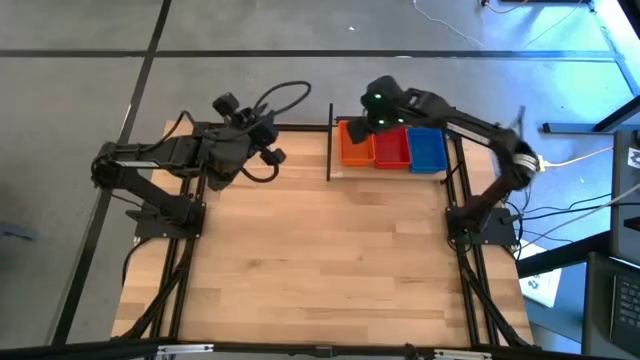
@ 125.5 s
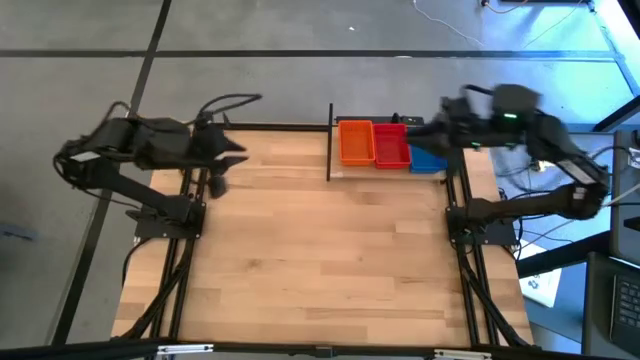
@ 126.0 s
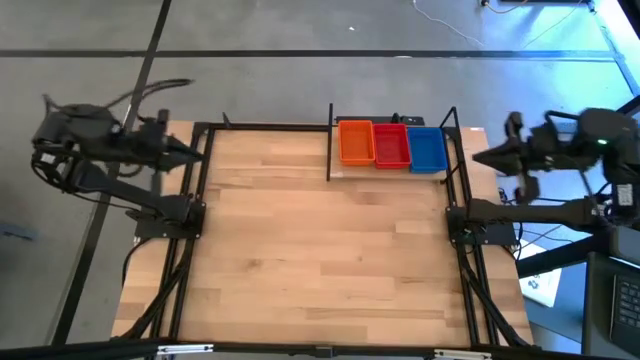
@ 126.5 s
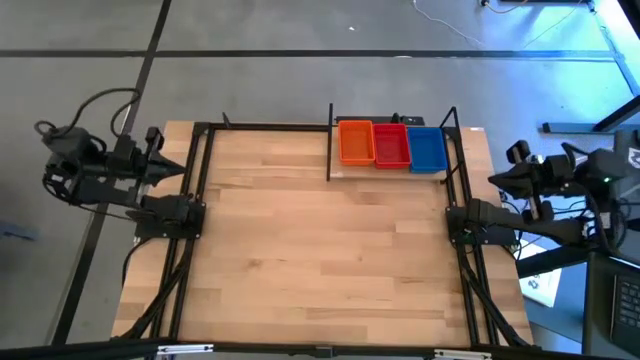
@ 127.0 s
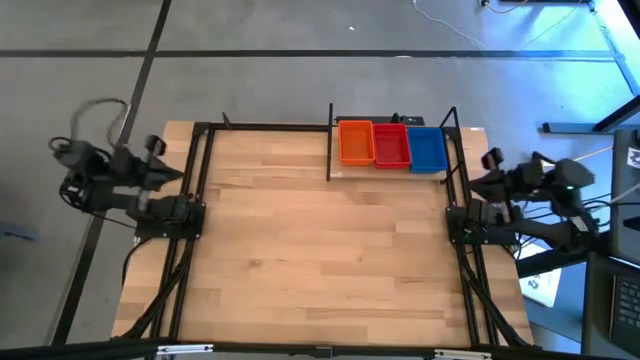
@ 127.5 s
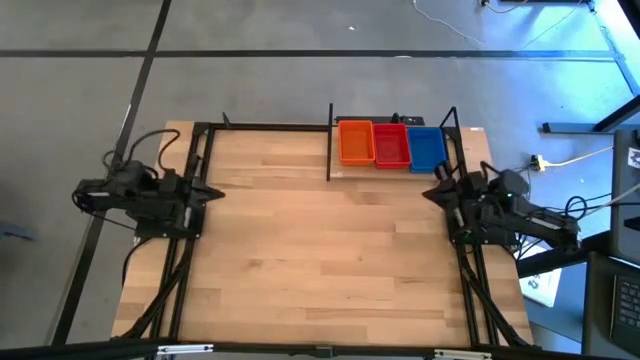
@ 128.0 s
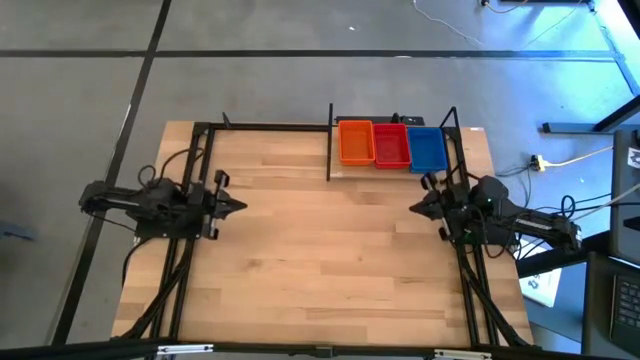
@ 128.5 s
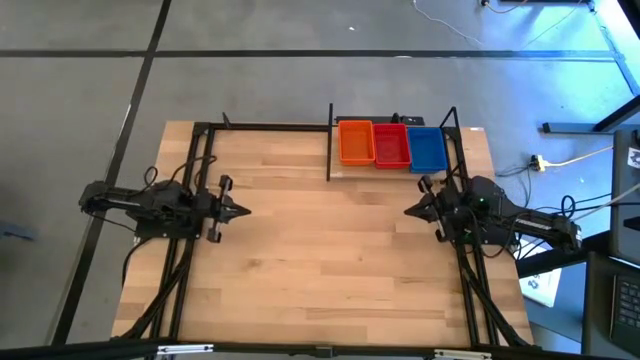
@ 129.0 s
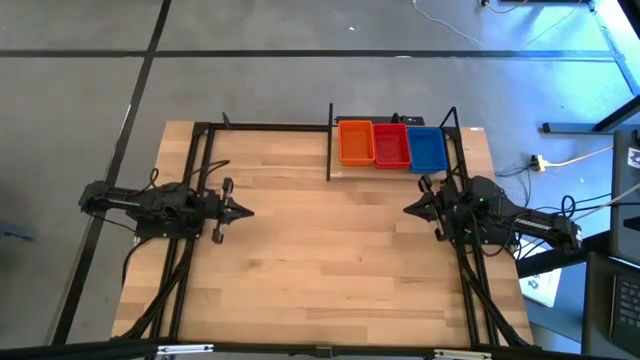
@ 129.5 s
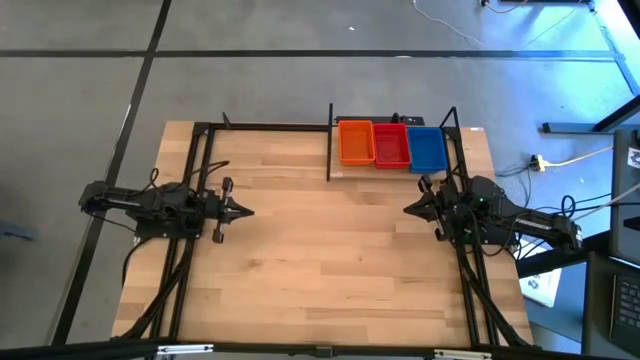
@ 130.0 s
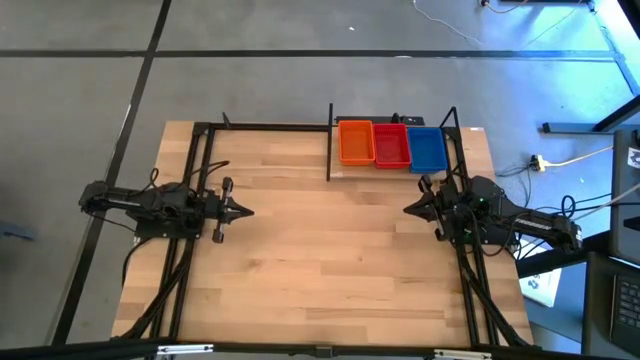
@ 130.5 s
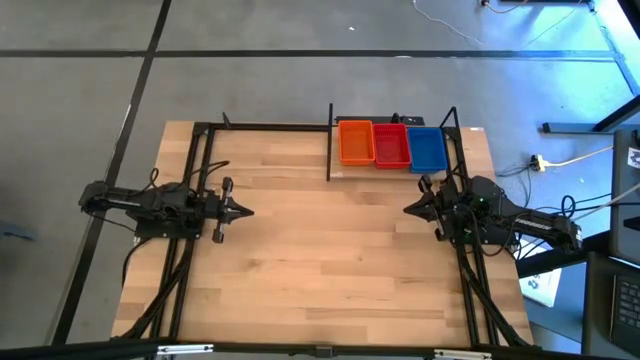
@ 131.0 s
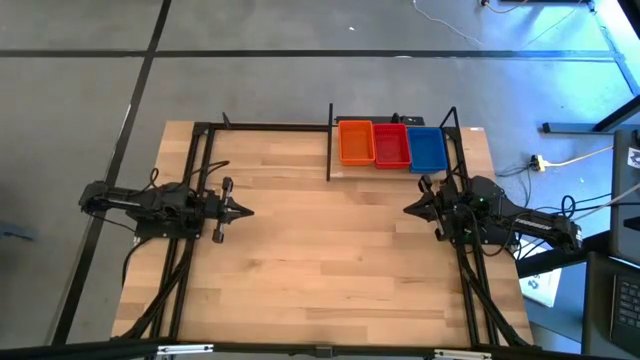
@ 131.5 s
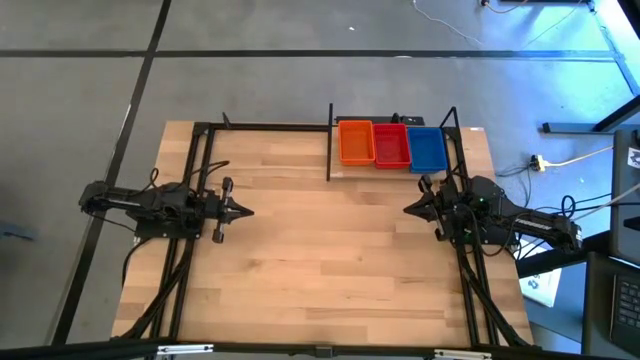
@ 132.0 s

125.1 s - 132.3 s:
Task: Stack baskets on shelf by color
Return to Home Position

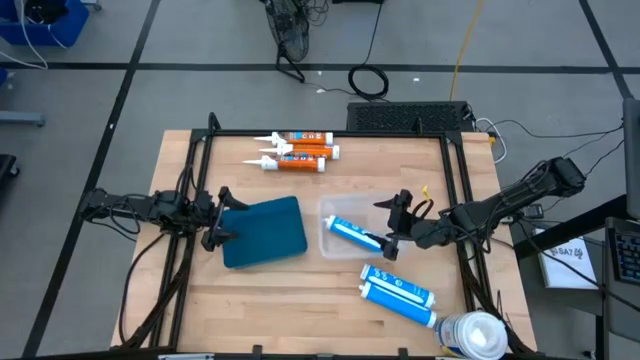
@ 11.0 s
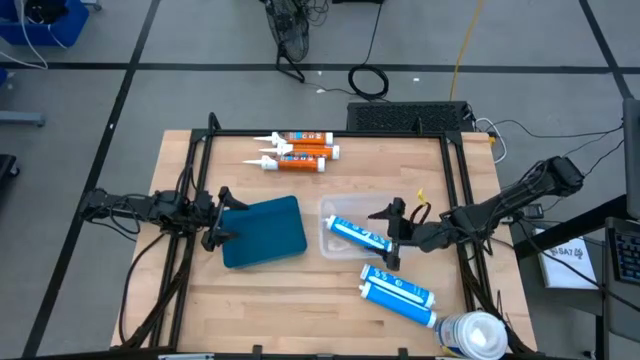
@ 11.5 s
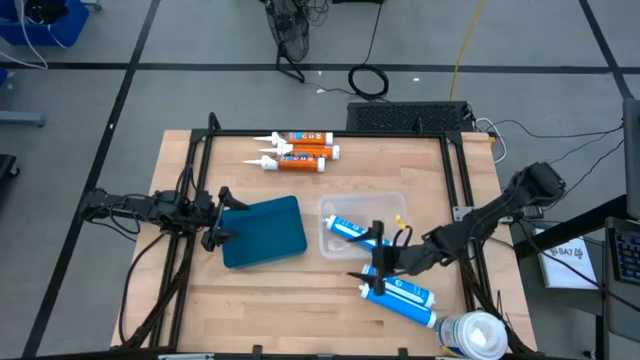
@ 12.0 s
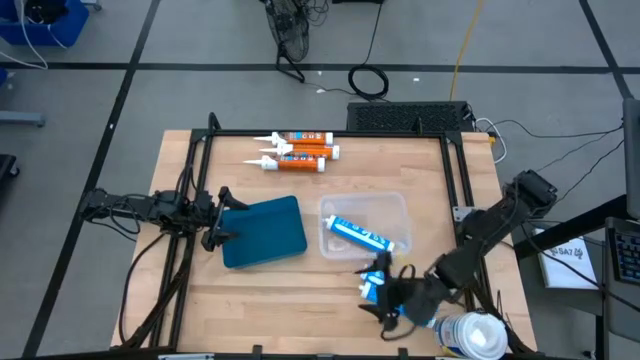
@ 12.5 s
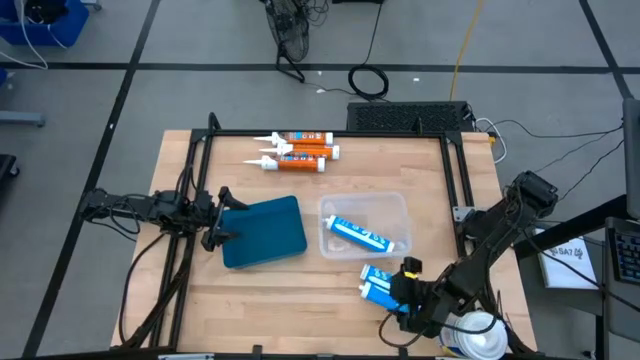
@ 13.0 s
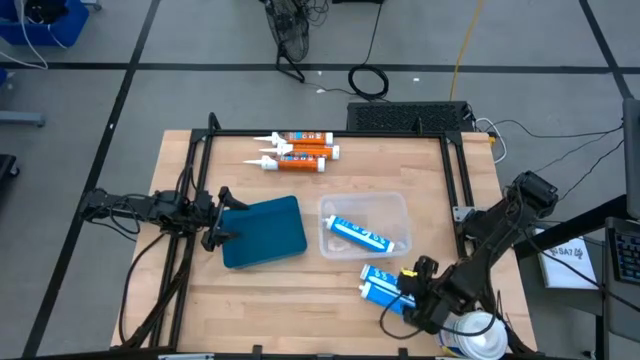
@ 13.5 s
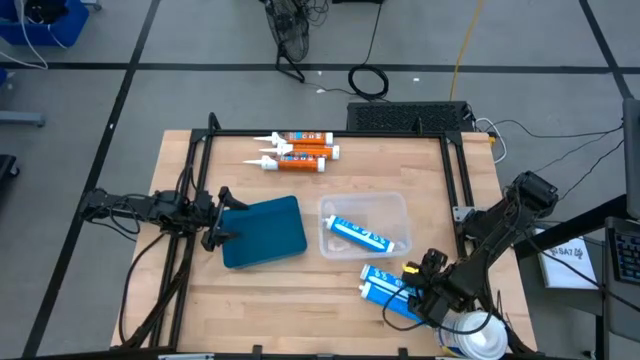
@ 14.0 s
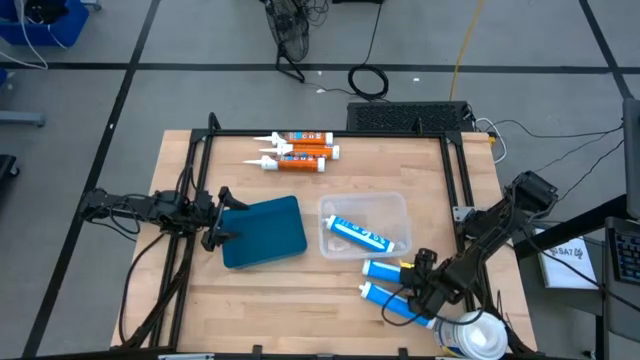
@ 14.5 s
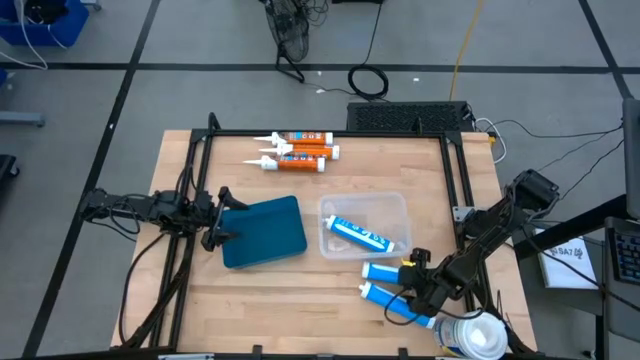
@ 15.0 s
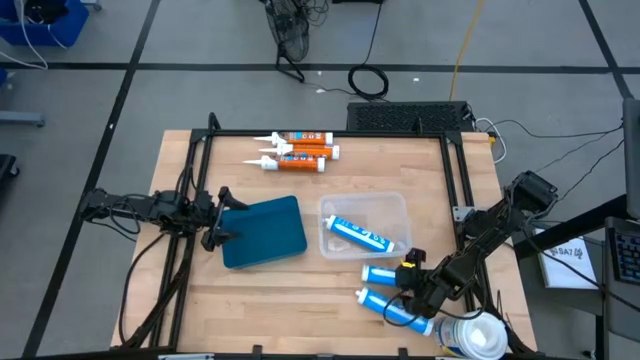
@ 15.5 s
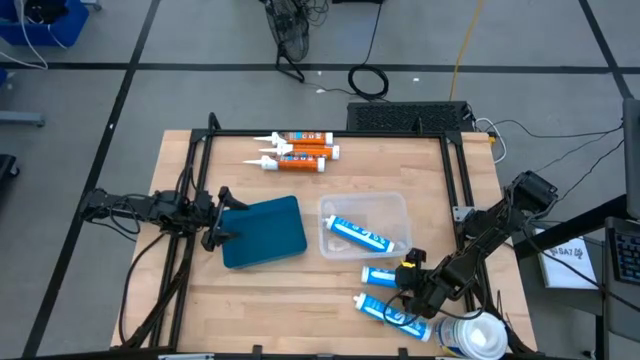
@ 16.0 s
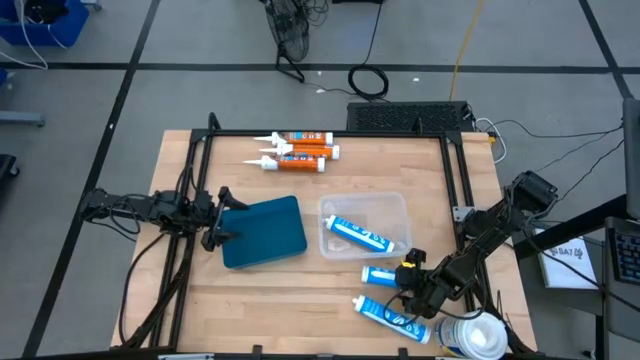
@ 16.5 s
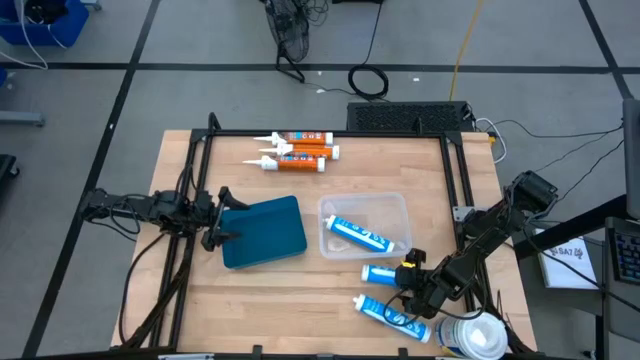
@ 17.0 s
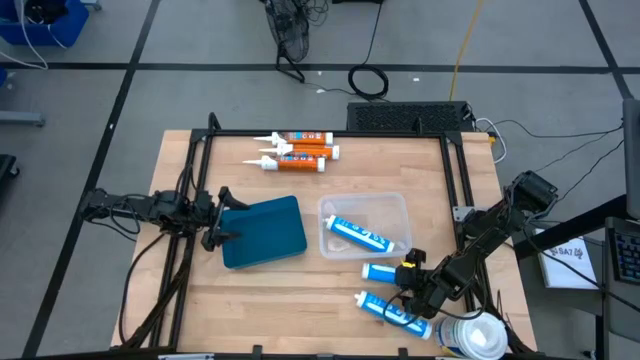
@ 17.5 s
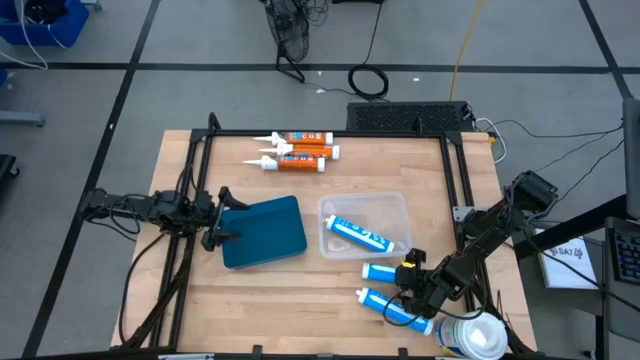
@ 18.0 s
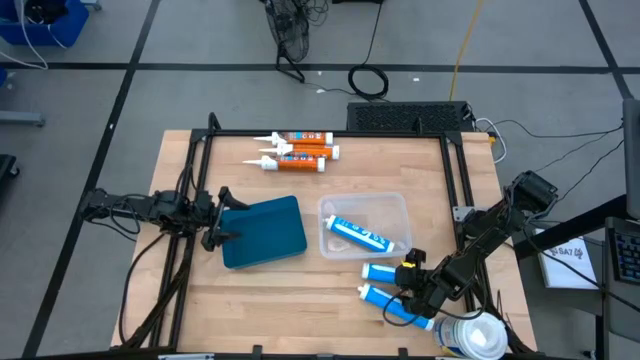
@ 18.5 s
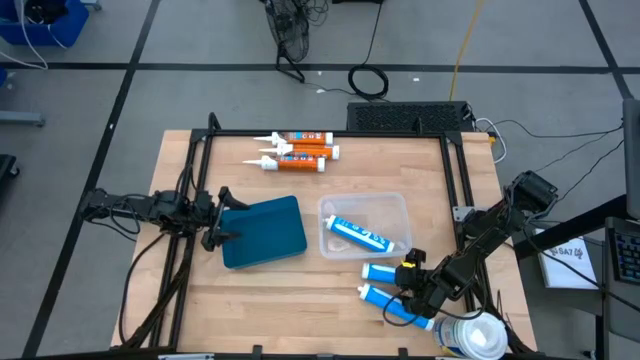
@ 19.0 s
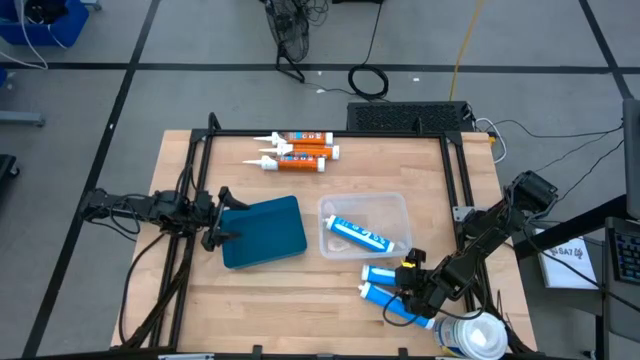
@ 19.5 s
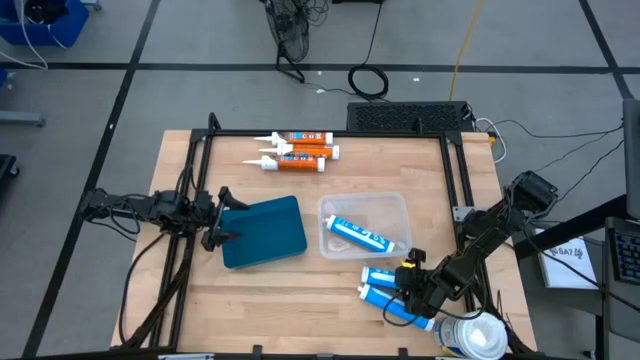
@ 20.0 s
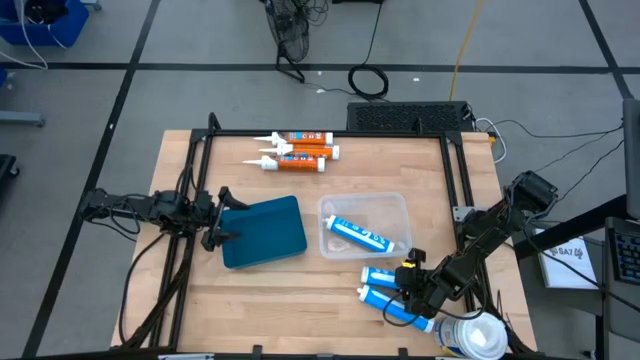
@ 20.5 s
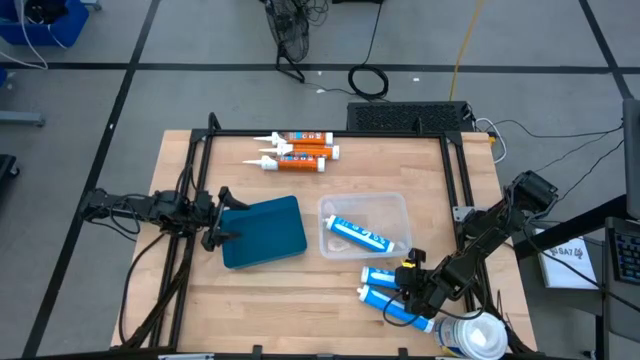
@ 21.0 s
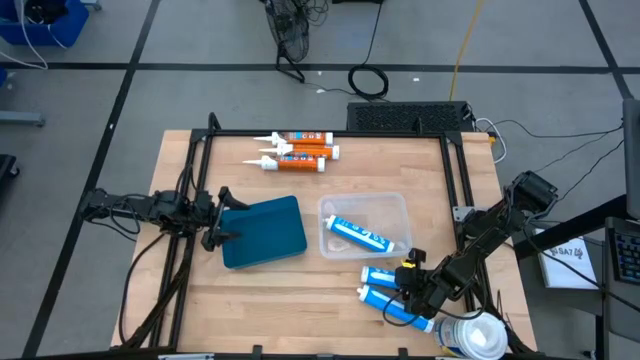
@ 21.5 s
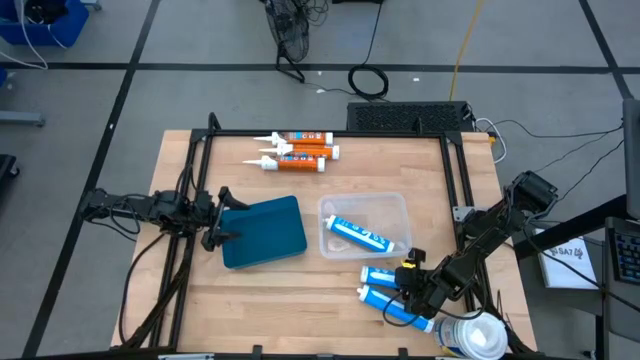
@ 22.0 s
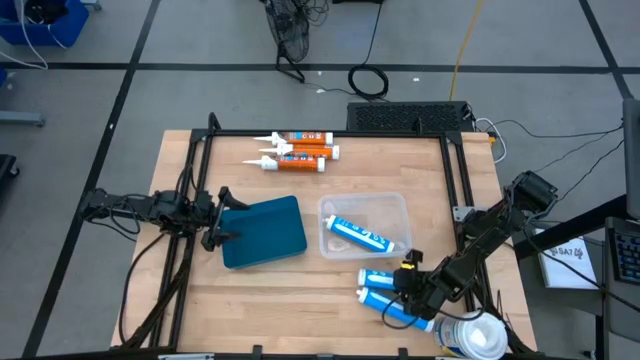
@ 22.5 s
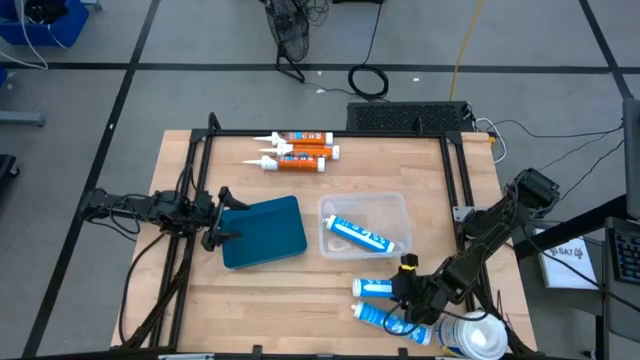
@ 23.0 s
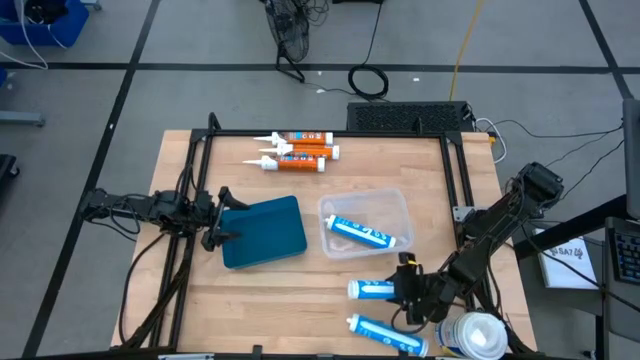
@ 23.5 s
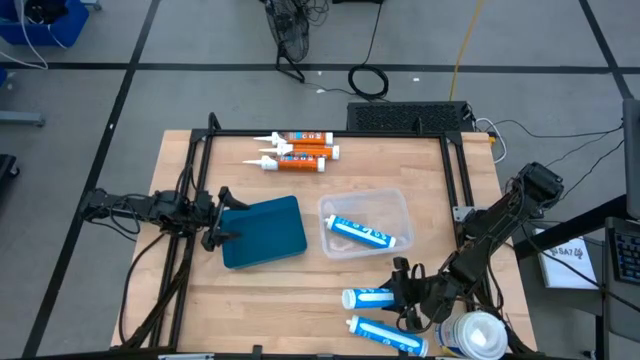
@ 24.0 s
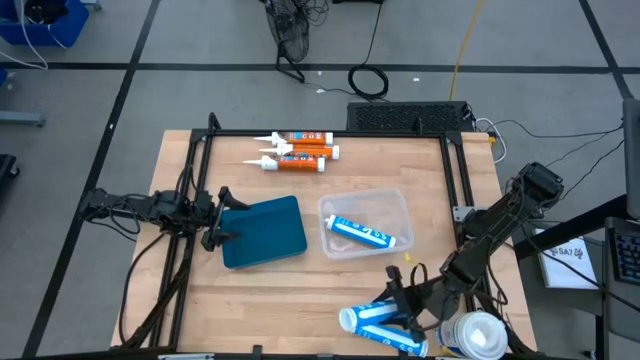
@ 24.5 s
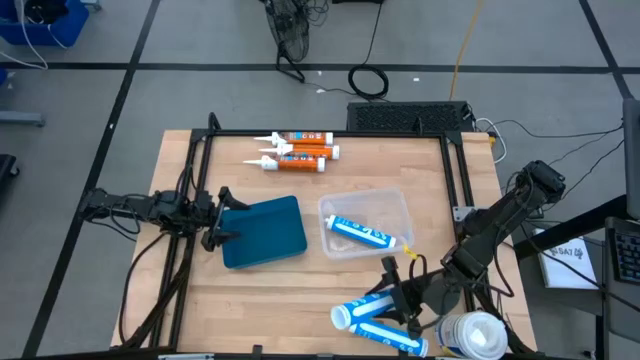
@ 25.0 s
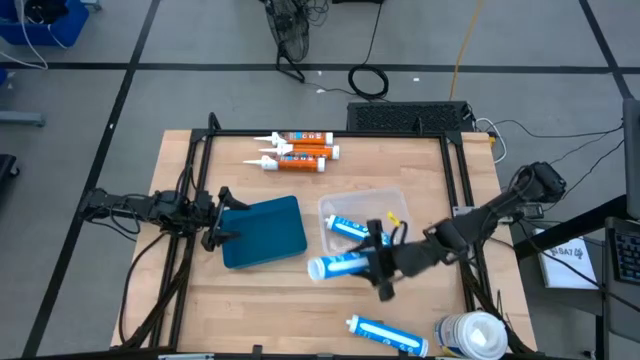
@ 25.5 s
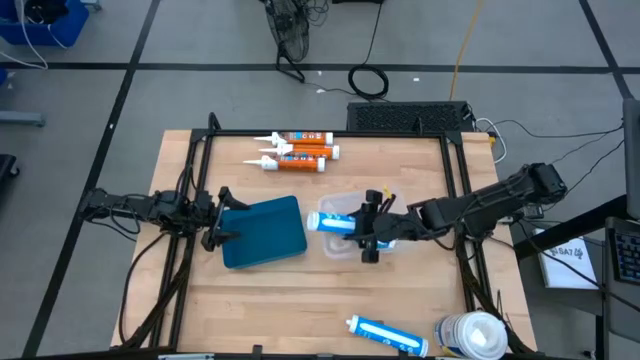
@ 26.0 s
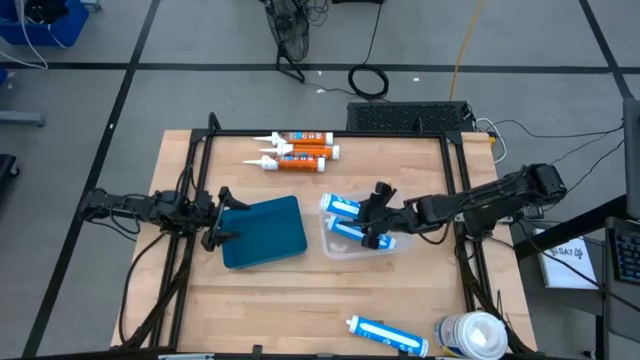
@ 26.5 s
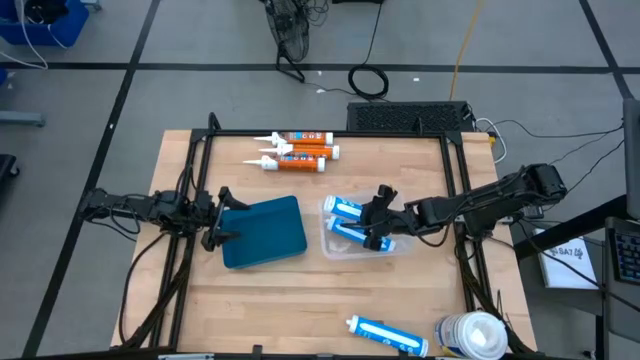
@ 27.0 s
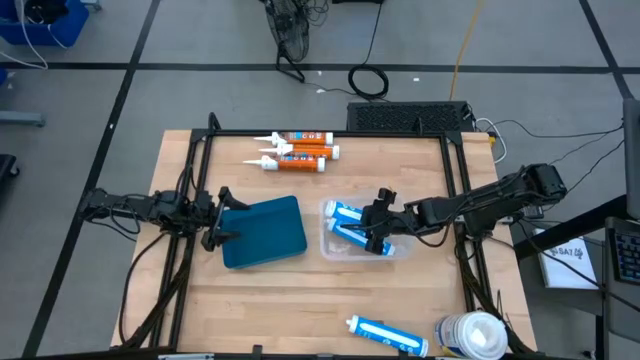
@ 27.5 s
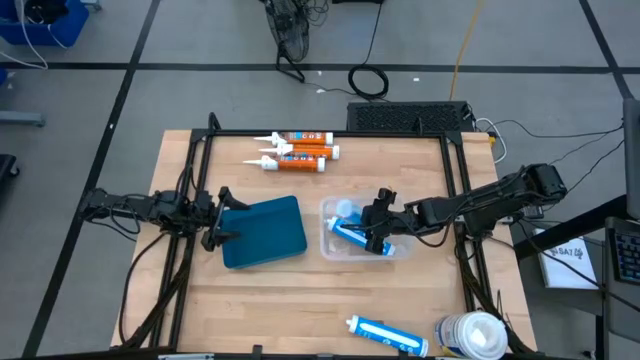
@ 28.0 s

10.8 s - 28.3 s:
Task: Pick & place silicon tubes, Sealant and Lysol wipes
Put the top blue sealant bottle into the transparent bin
